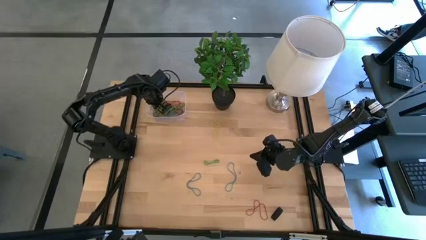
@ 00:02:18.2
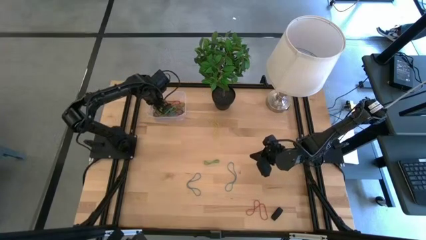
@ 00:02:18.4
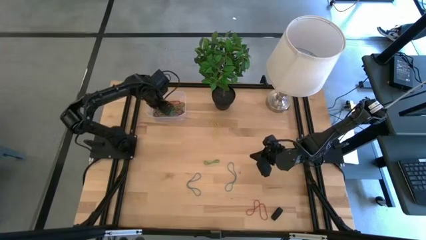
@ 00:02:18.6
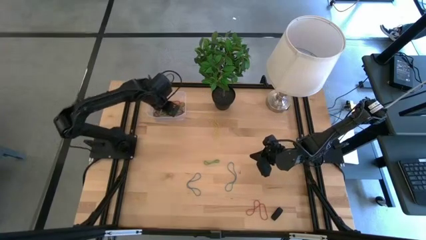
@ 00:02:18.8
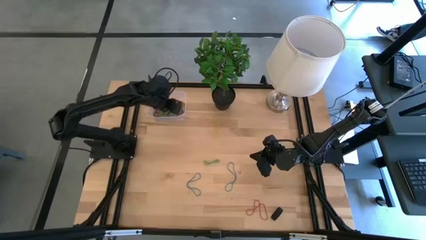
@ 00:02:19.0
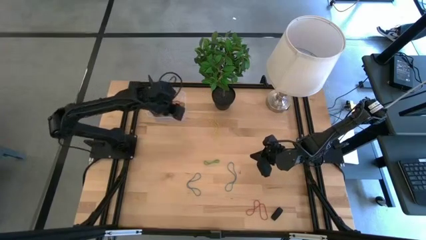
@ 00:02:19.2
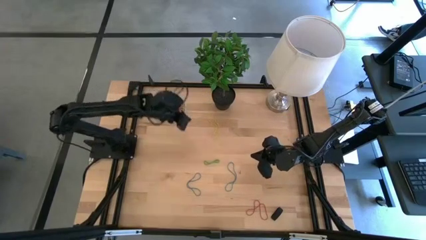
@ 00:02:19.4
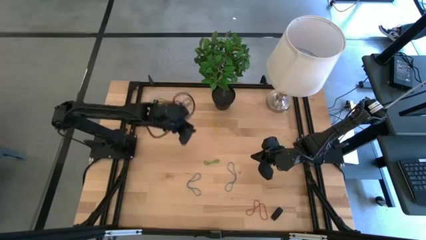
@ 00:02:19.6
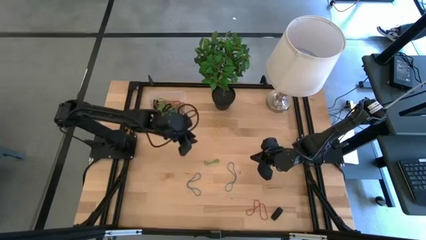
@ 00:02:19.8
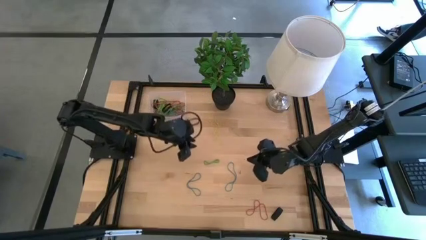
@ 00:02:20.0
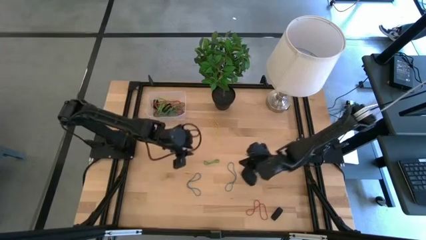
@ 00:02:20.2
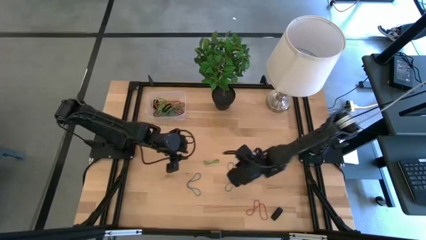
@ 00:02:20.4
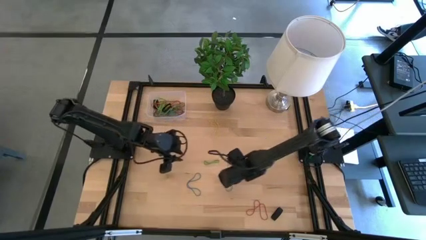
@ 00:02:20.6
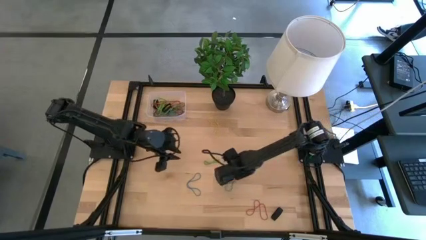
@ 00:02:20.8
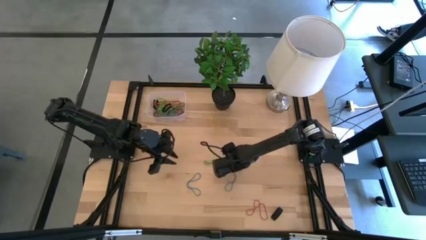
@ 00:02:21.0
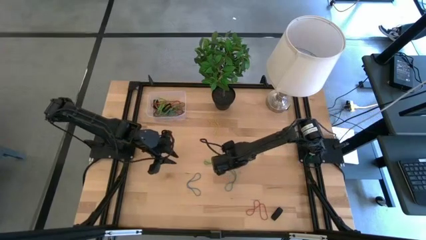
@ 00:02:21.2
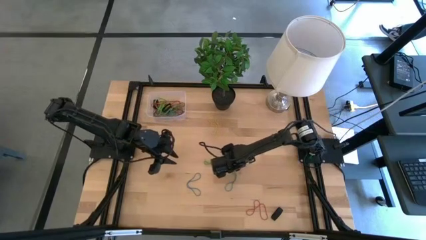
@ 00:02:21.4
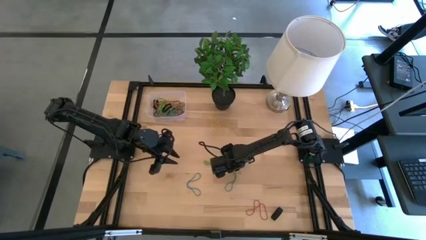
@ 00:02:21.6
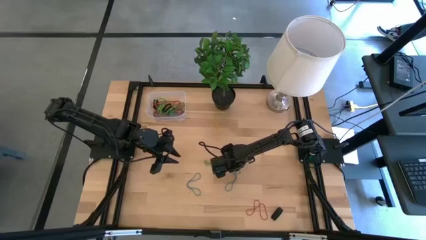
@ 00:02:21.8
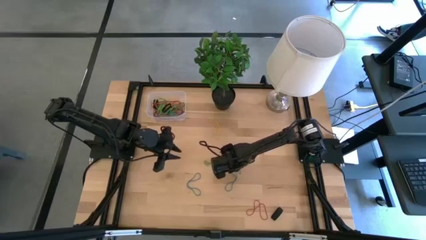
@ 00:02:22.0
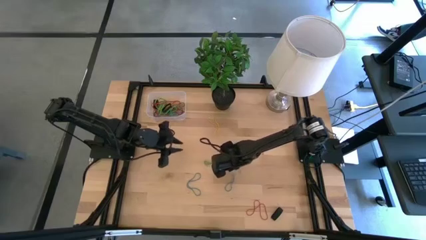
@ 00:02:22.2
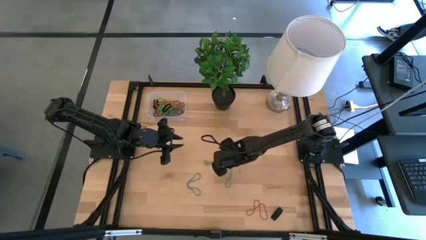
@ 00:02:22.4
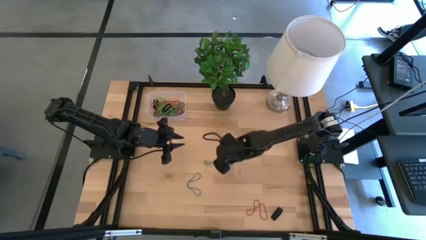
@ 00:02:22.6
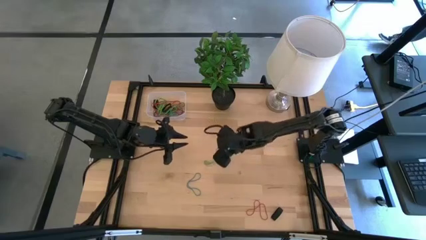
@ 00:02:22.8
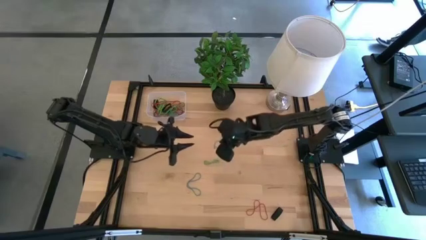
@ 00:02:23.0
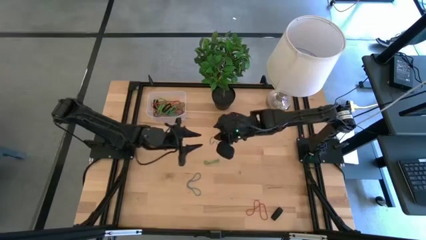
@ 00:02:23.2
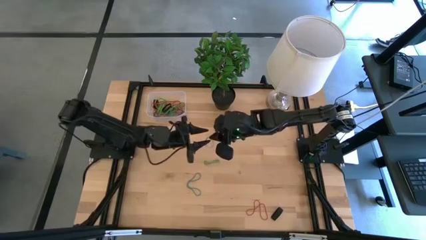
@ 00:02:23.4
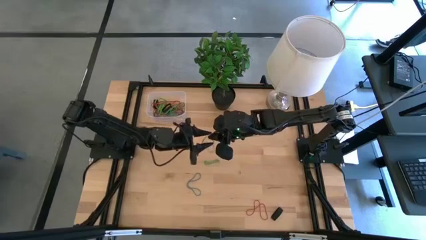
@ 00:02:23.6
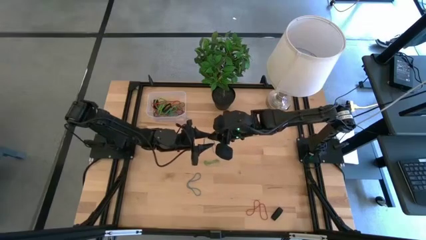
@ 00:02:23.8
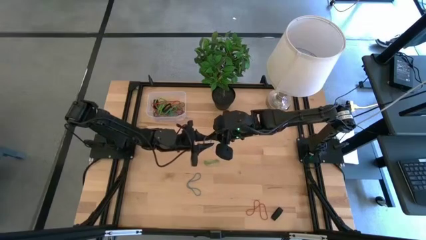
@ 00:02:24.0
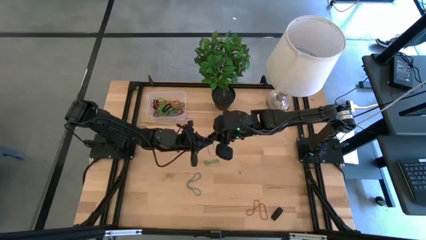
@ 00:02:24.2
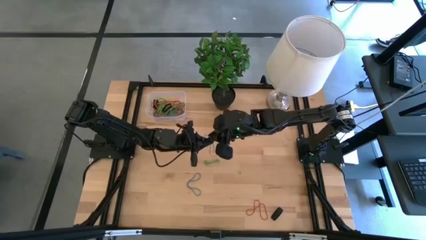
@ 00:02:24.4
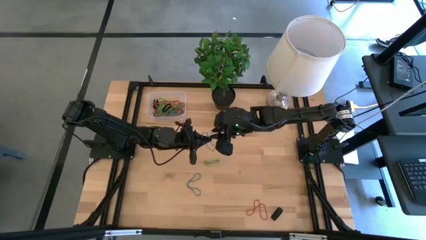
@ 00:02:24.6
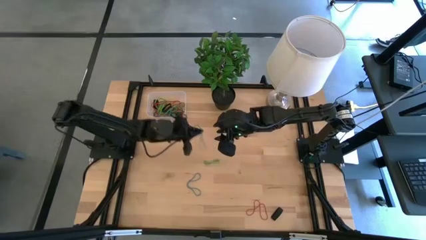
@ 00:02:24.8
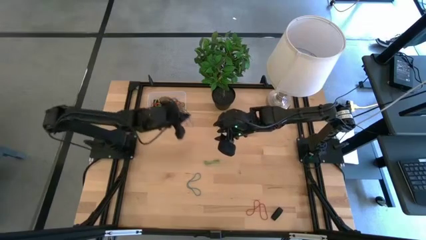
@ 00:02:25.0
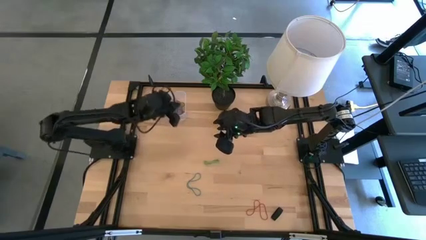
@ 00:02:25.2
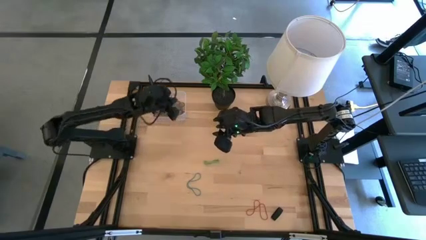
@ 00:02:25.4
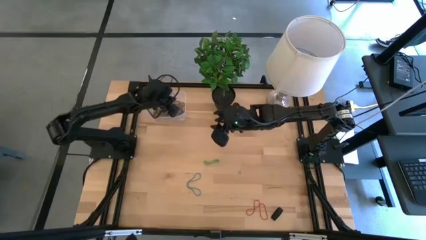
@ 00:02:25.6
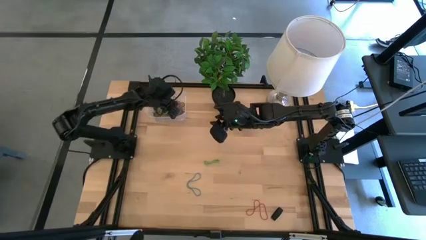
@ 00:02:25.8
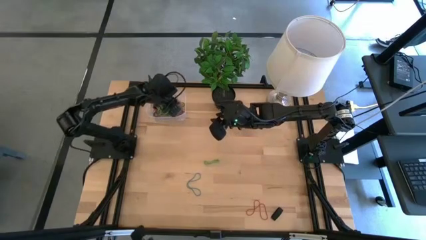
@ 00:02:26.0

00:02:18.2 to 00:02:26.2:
Task: Pick and place rubber bands into bin
Put the blue rubber band into the transparent bin

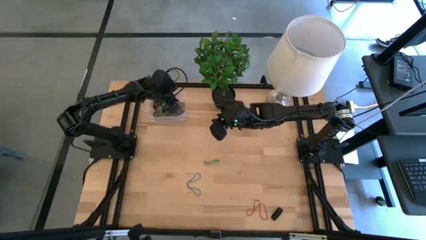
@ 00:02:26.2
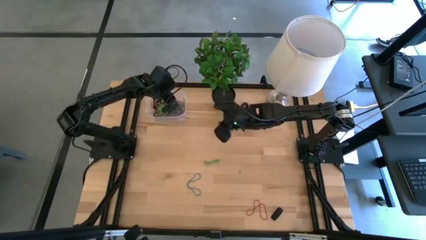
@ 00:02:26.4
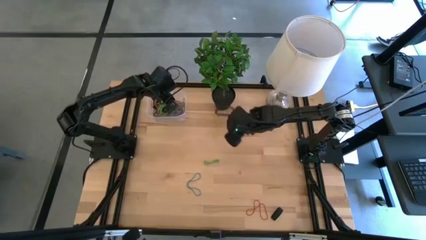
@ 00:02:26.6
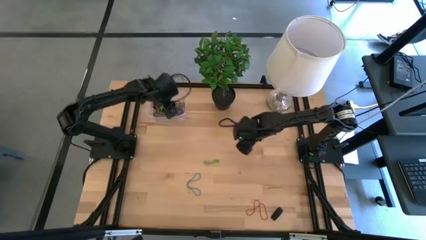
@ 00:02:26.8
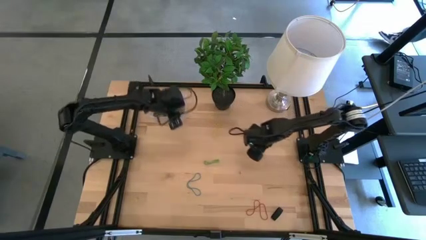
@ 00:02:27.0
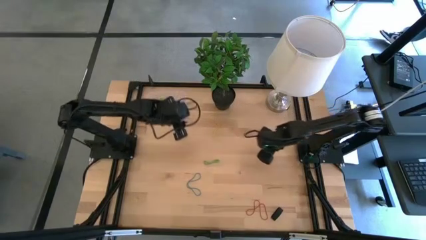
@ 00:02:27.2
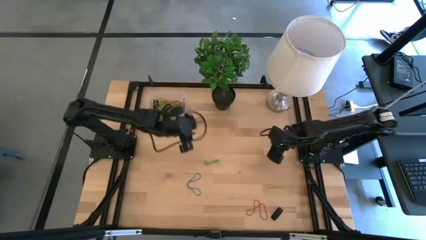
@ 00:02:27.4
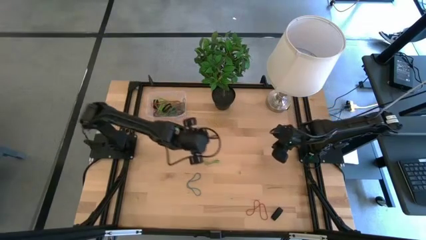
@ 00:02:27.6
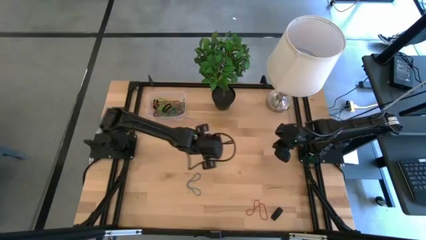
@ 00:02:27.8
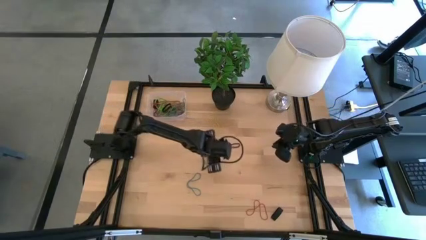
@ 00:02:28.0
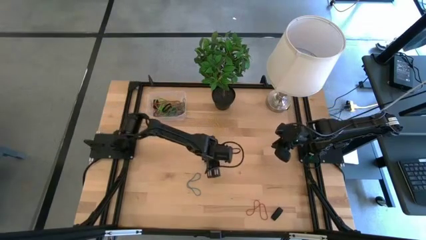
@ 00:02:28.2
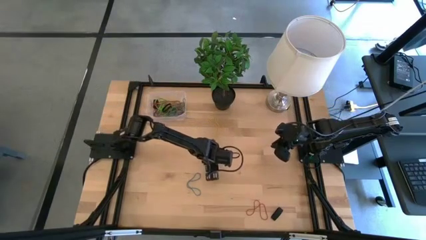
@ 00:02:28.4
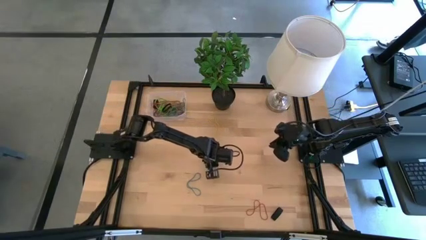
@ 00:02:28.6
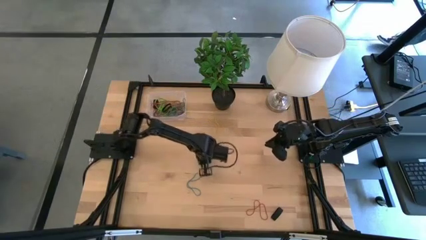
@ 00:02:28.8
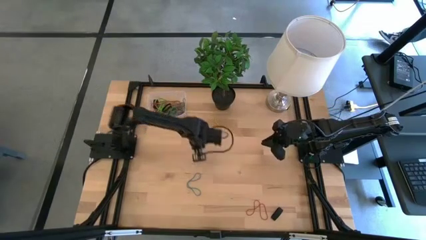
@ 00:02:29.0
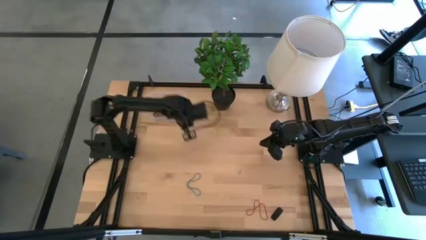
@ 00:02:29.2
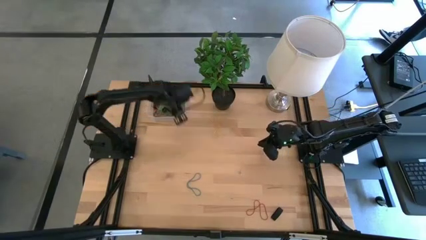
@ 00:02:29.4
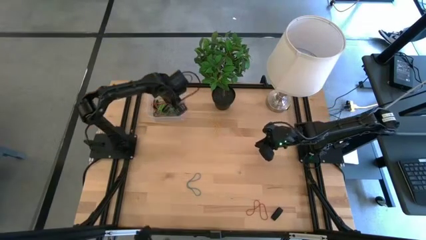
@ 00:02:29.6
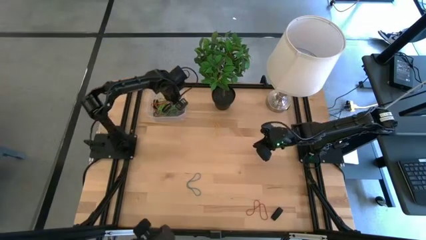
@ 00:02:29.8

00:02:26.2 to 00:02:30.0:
Put the green rubber band into the transparent bin

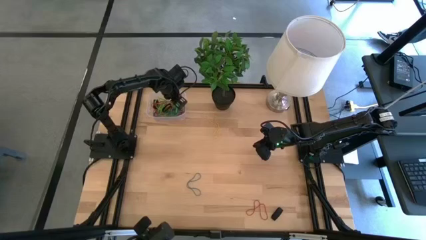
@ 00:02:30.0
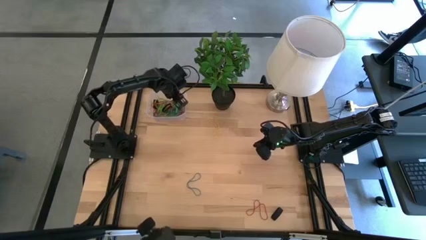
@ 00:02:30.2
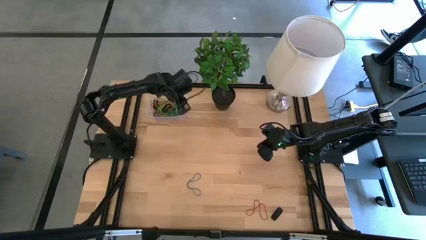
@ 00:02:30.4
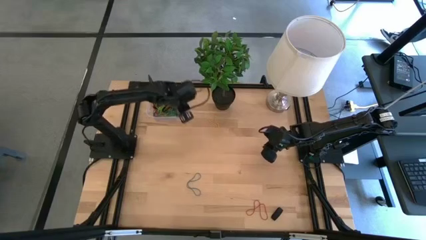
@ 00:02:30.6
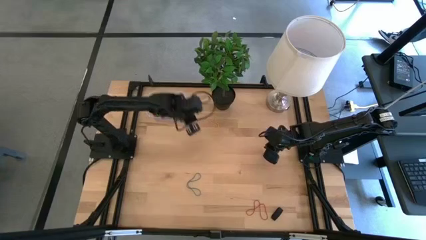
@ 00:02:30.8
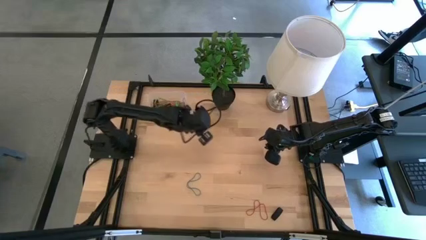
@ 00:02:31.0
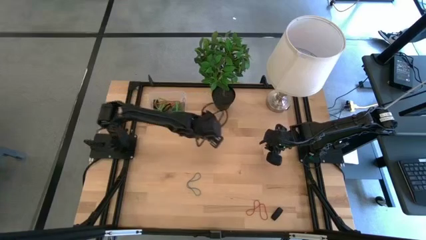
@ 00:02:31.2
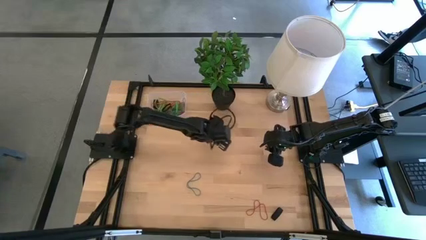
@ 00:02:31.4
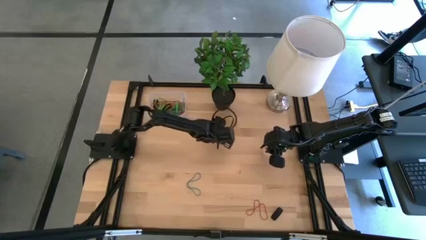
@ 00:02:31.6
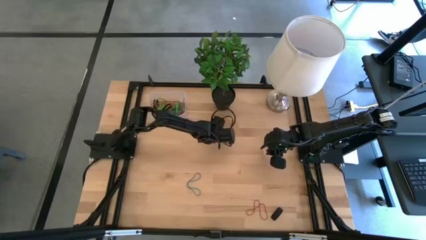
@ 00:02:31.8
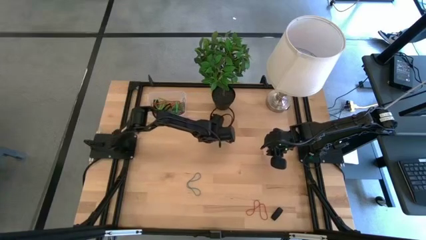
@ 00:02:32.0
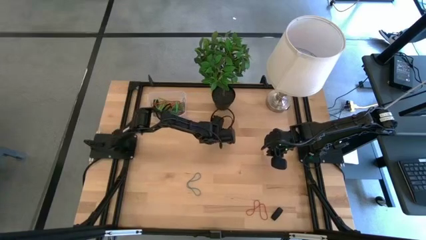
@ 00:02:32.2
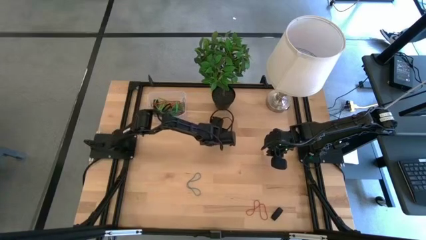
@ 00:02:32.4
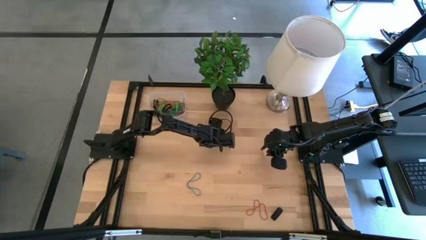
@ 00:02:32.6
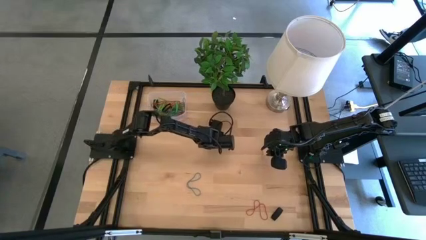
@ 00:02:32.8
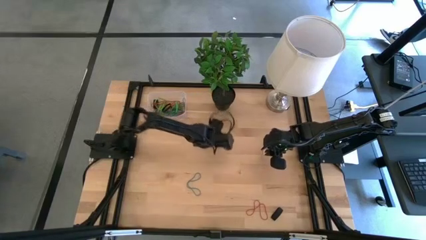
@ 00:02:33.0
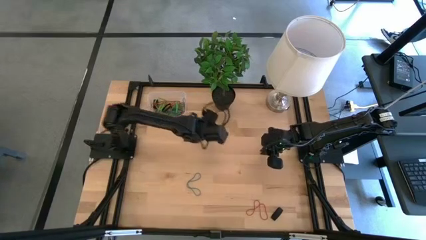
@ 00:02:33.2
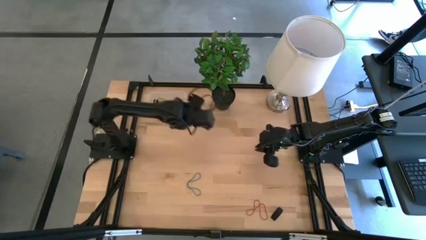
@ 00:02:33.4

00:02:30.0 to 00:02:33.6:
Put the yellow rubber band into the transparent bin

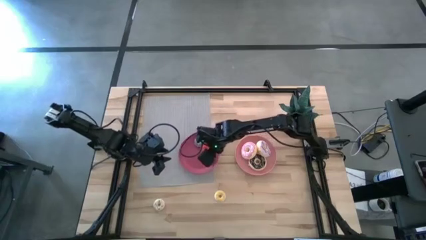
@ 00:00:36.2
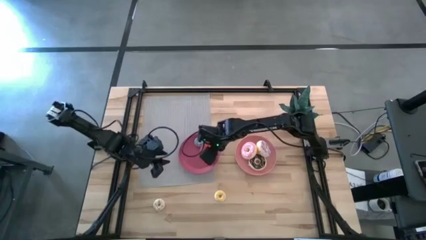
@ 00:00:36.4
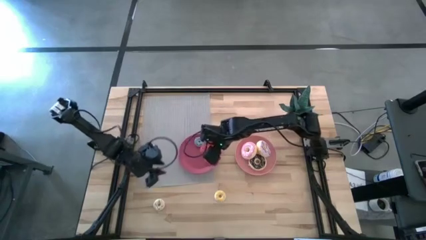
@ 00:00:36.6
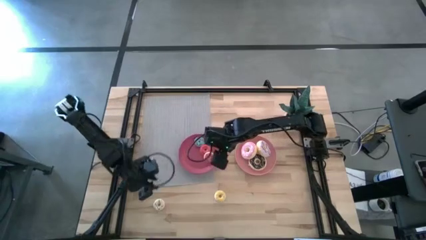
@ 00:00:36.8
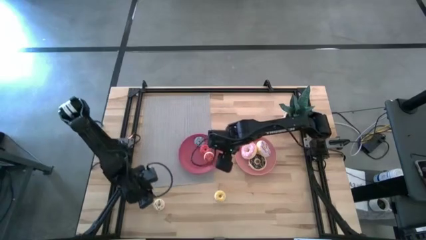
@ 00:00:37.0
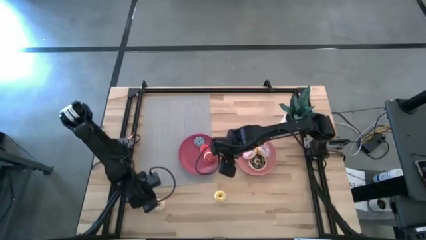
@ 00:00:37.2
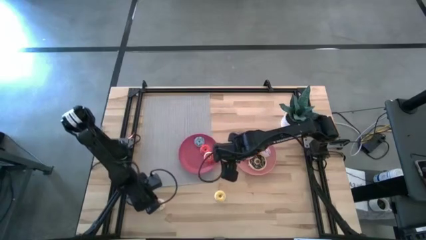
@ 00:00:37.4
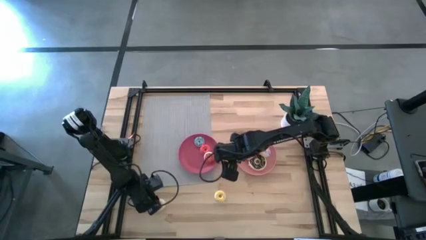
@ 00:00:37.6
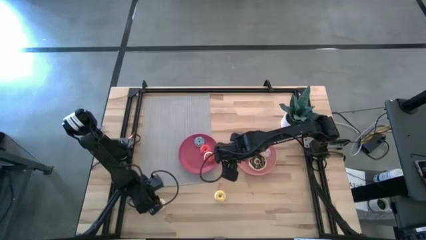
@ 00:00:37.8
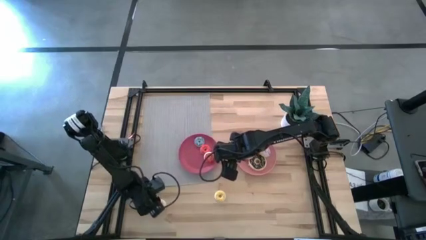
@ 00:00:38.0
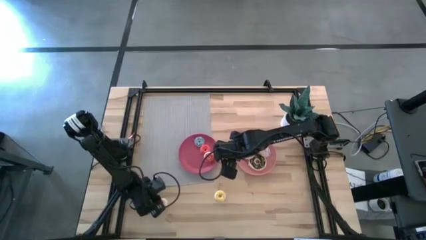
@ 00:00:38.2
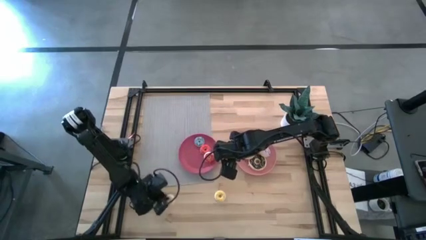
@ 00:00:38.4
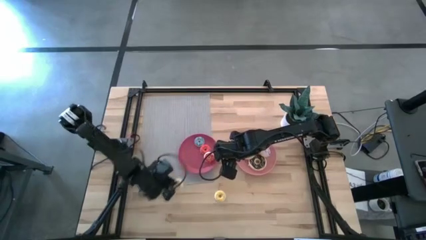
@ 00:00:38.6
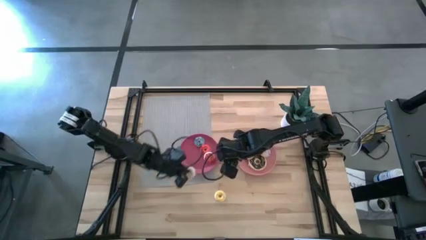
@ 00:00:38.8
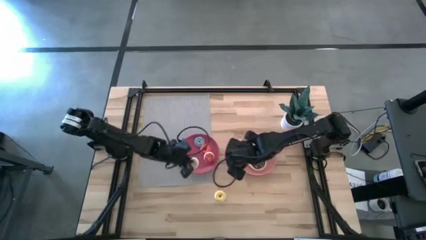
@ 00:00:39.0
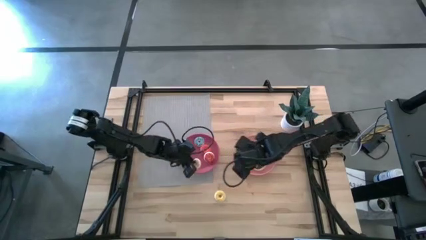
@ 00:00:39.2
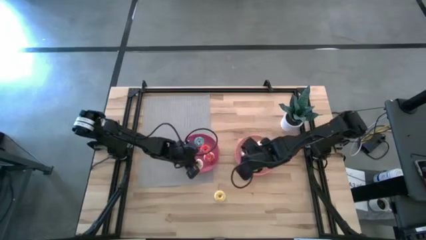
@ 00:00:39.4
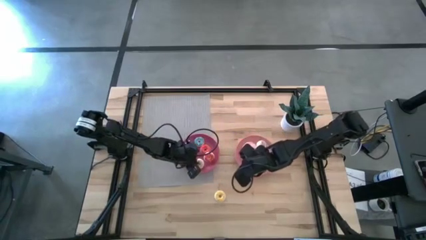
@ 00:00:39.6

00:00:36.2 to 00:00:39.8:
Task: Pick & Place donuts
Put the small white doughnut into the pink plate
